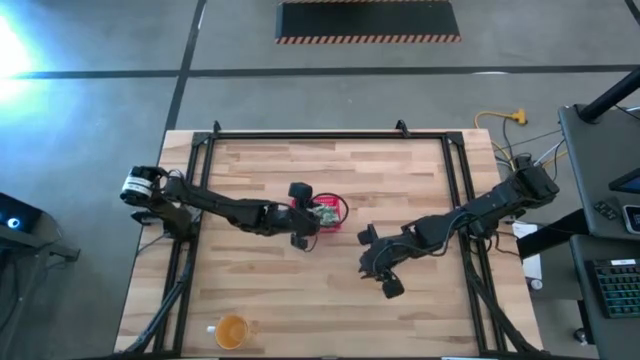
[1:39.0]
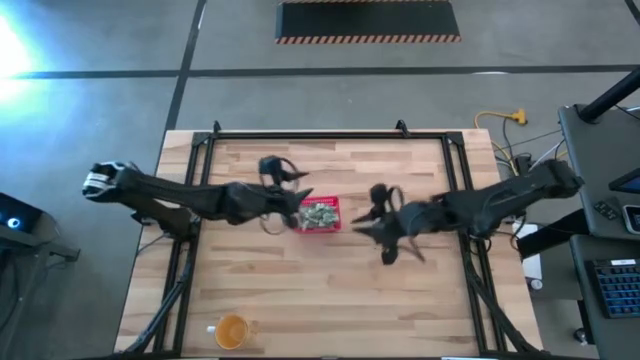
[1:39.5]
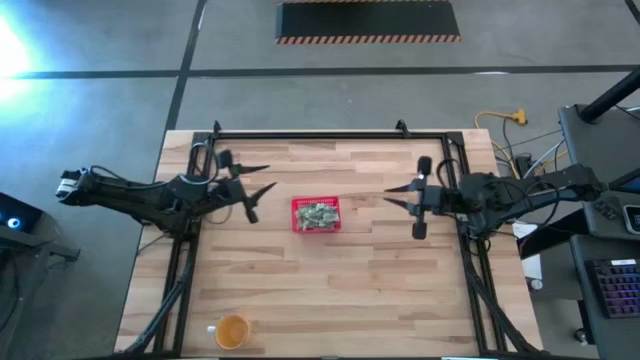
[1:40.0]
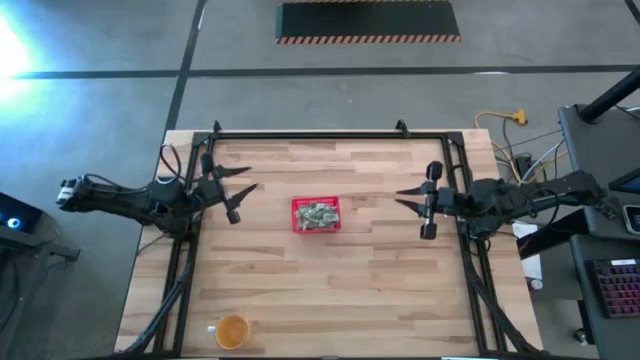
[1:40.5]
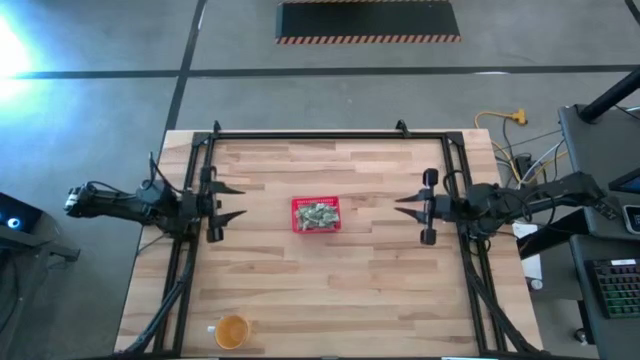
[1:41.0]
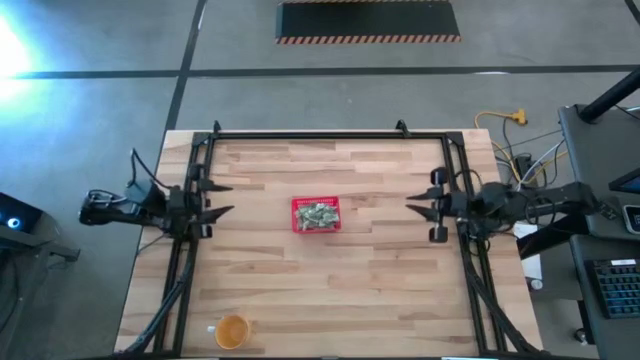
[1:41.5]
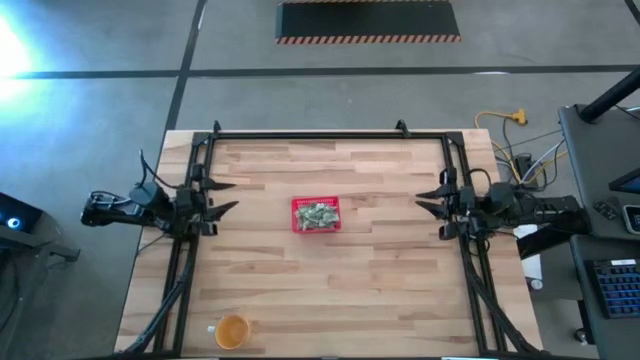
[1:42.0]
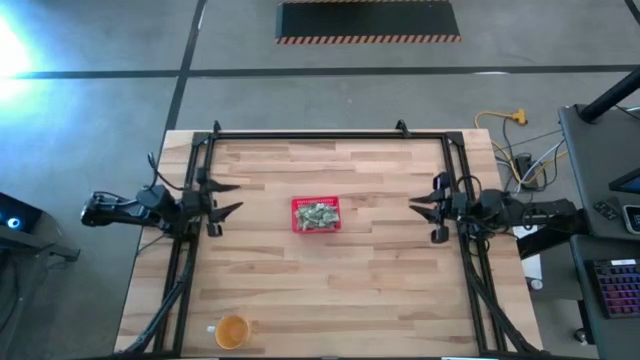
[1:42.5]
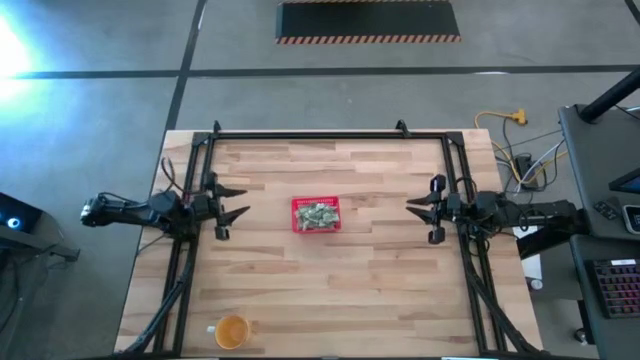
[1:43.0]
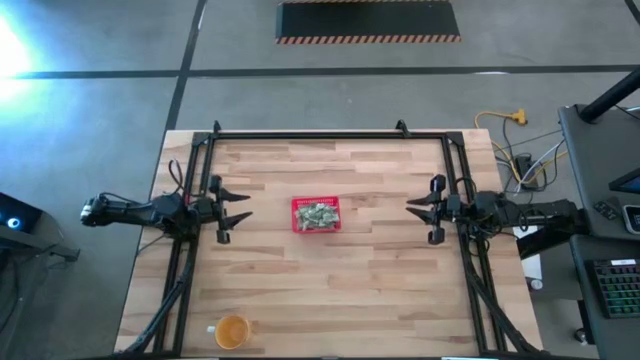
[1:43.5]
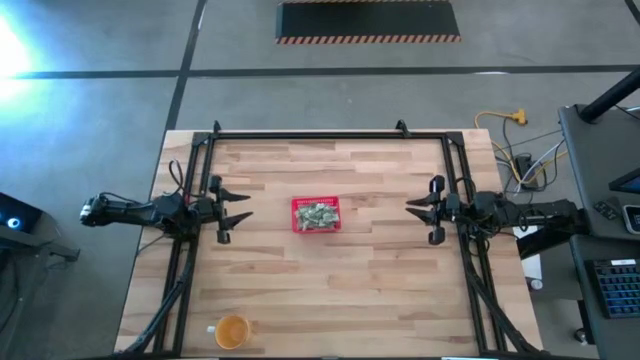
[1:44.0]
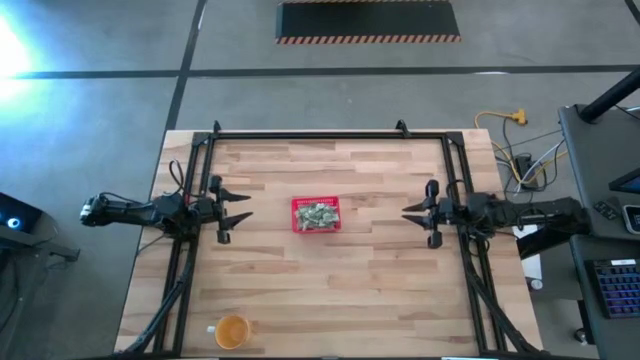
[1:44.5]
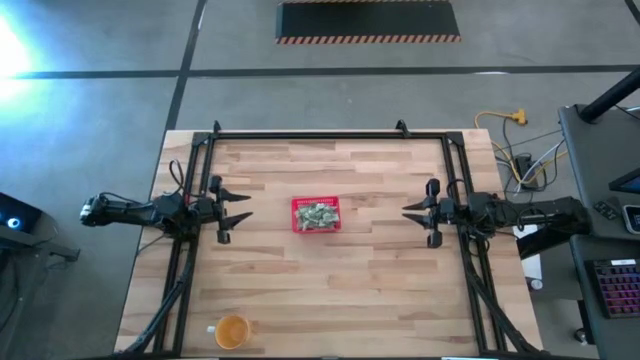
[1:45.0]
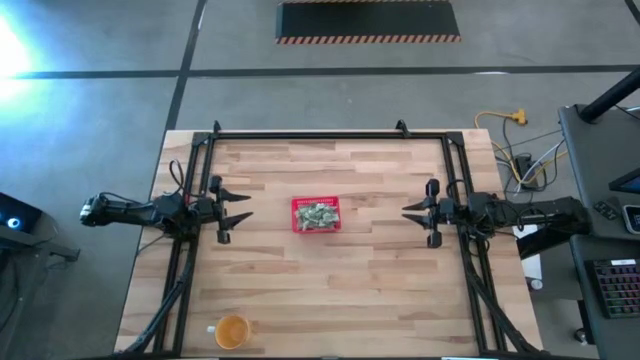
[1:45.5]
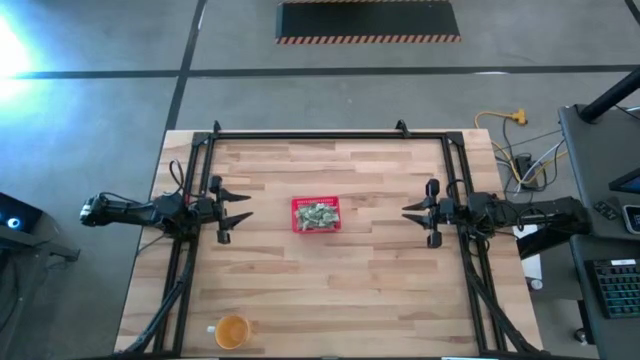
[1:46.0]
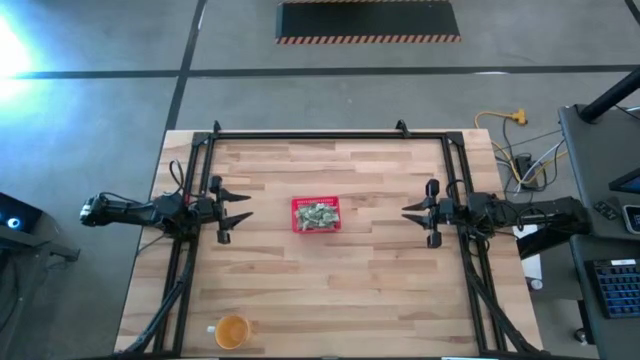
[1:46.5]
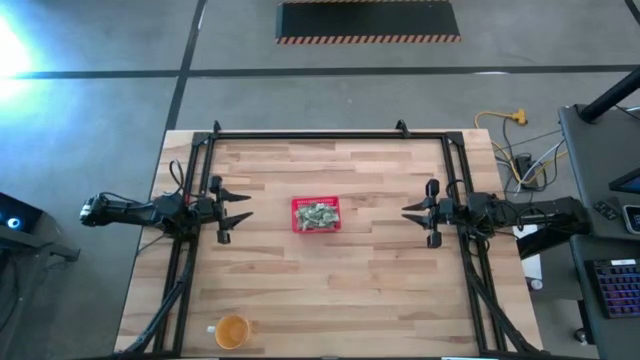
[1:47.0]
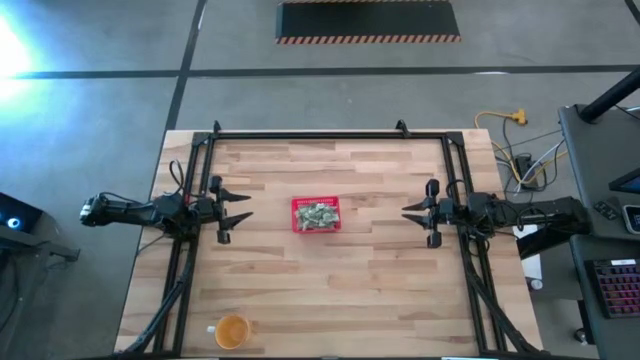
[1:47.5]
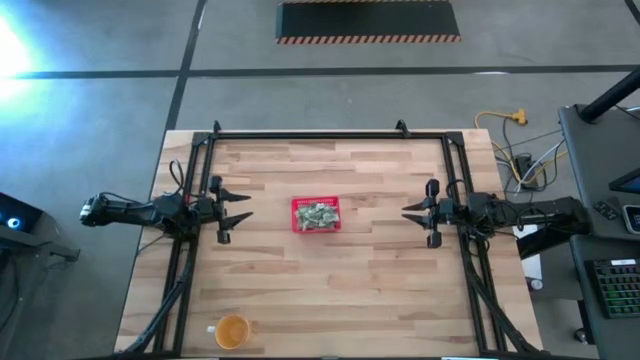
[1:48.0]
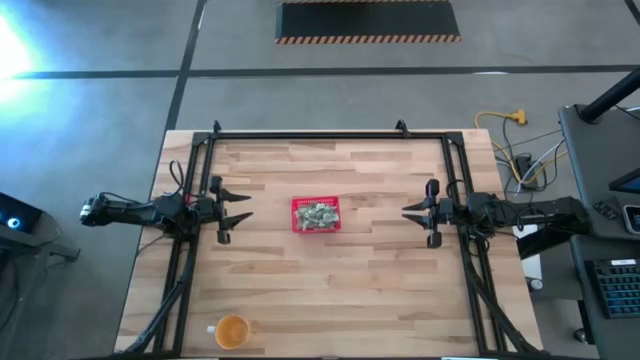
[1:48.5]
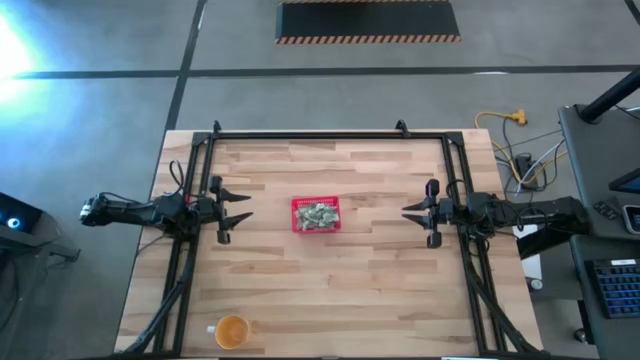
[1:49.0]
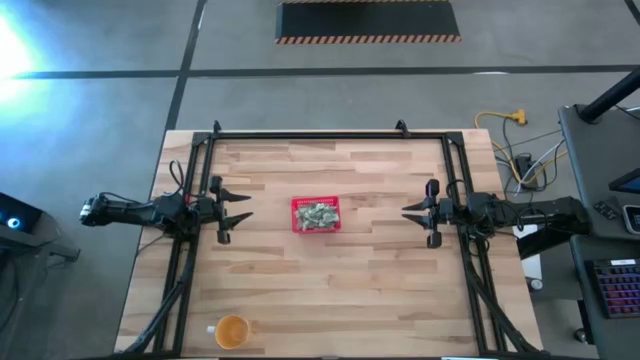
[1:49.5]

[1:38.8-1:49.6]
Task: Pick and place items into bin
Return to Home Position

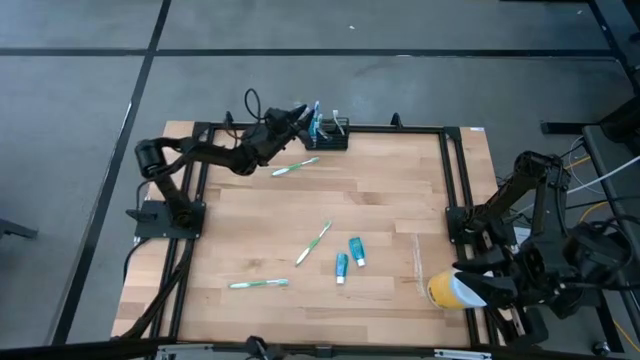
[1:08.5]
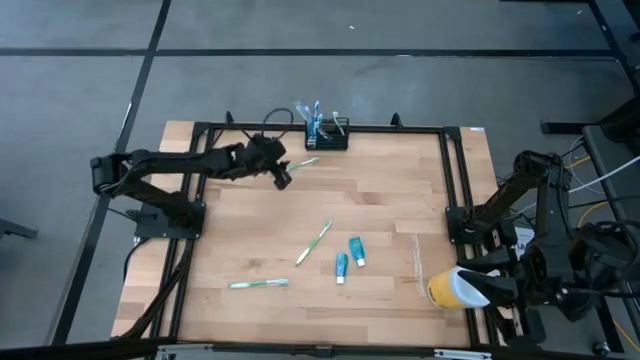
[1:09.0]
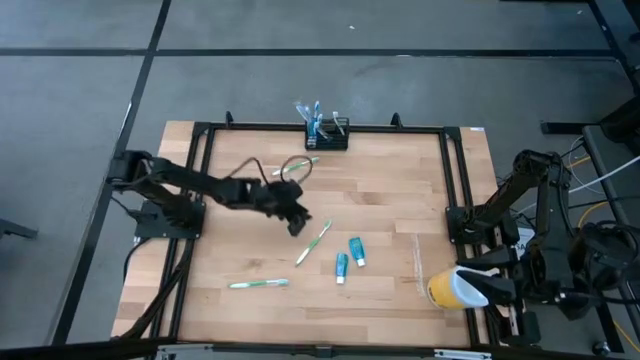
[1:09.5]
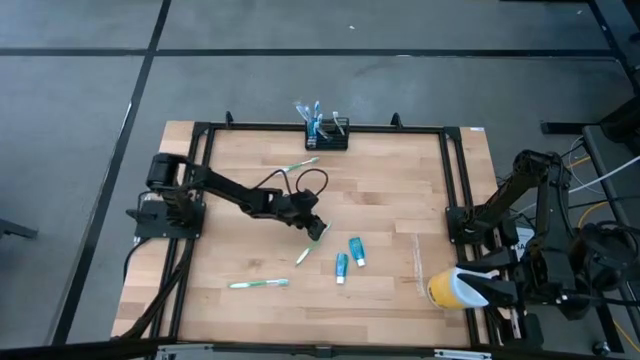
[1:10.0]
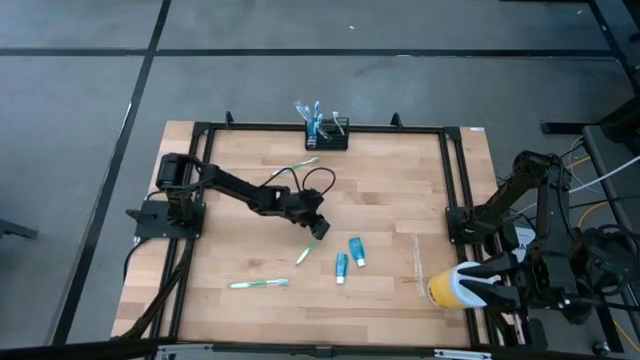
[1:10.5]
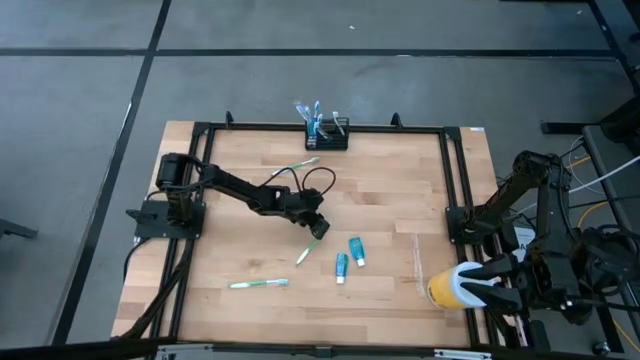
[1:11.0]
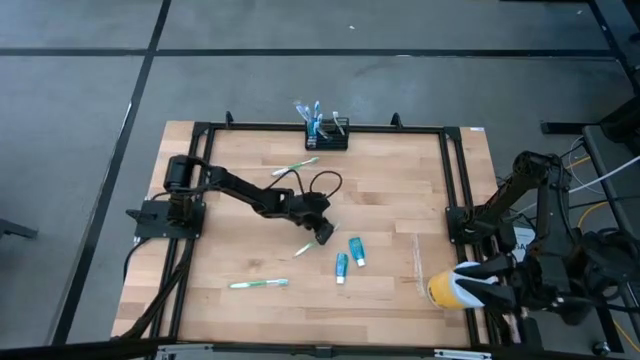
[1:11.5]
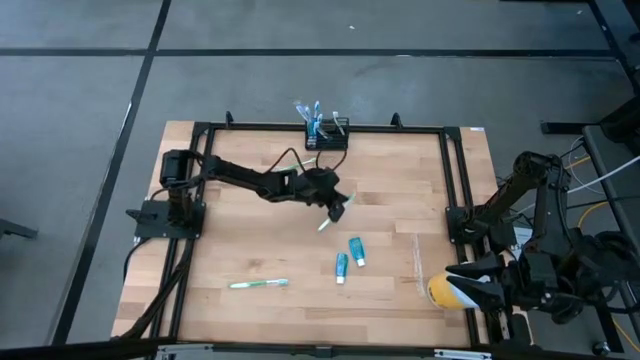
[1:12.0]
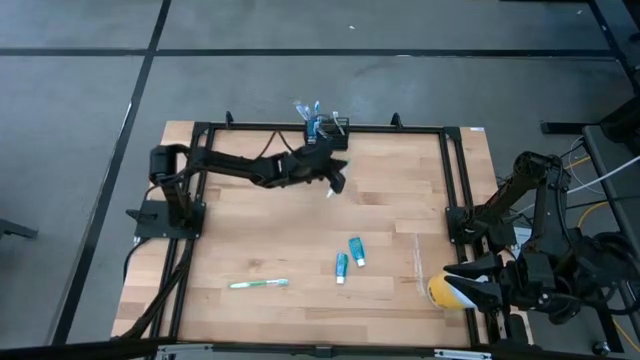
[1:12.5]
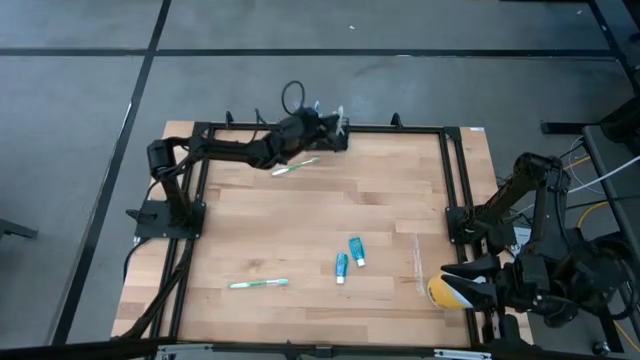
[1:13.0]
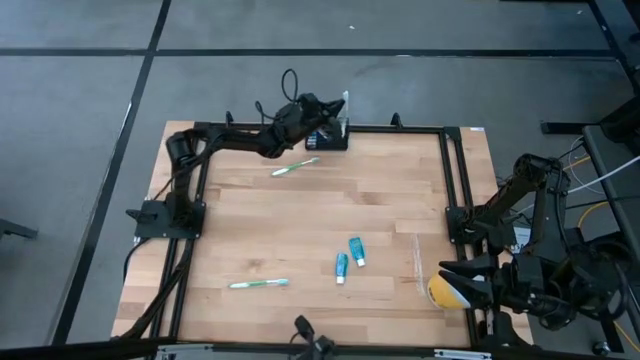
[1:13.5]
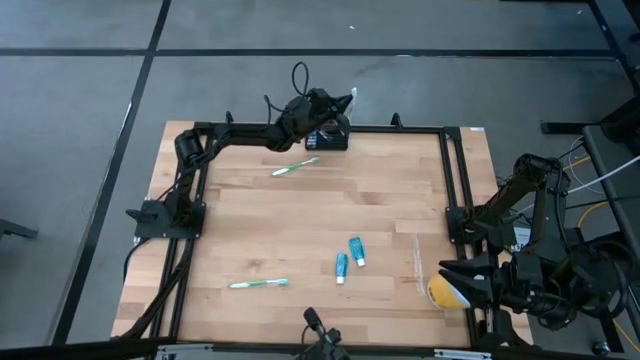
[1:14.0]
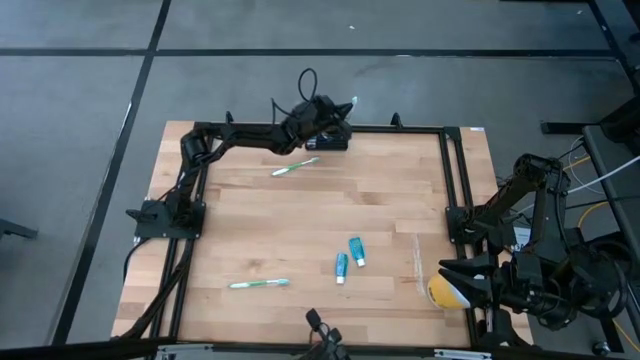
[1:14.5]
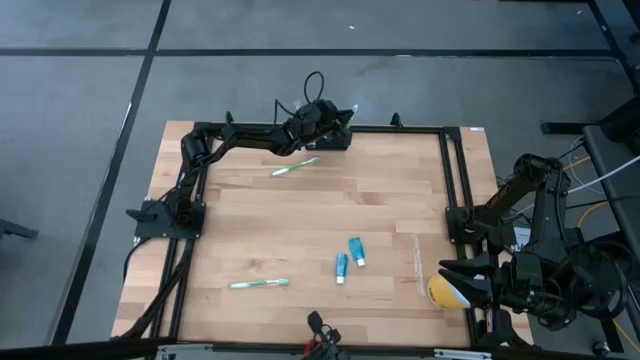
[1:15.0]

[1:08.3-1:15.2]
Task: Pick & Place toothbrushing station
Put the green toothbrush into the wire organizer

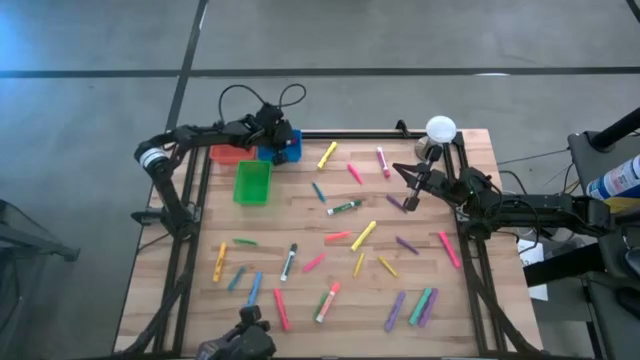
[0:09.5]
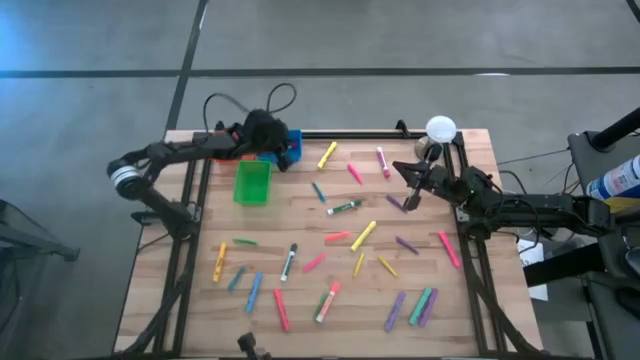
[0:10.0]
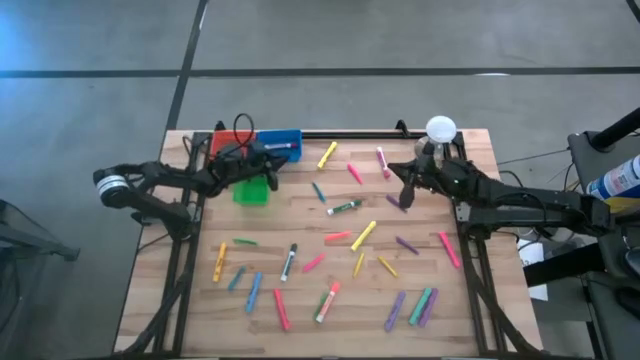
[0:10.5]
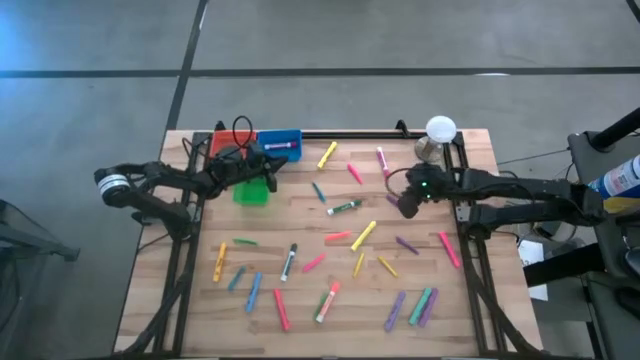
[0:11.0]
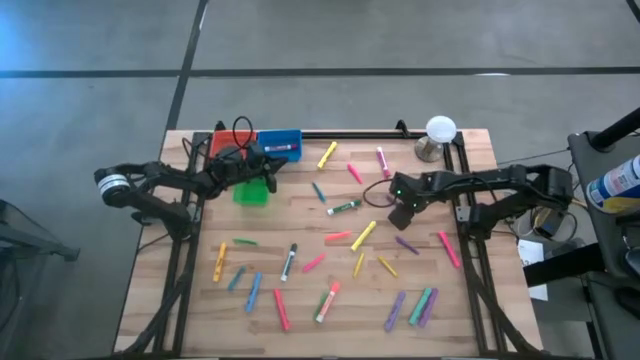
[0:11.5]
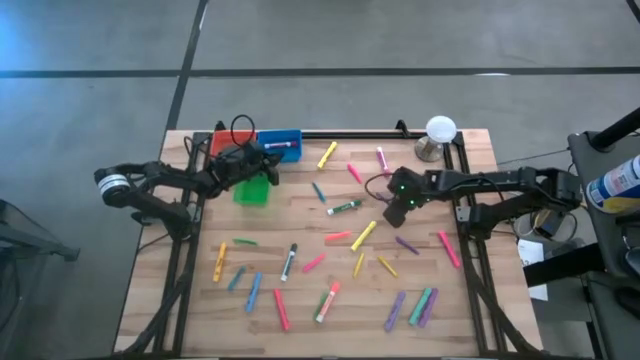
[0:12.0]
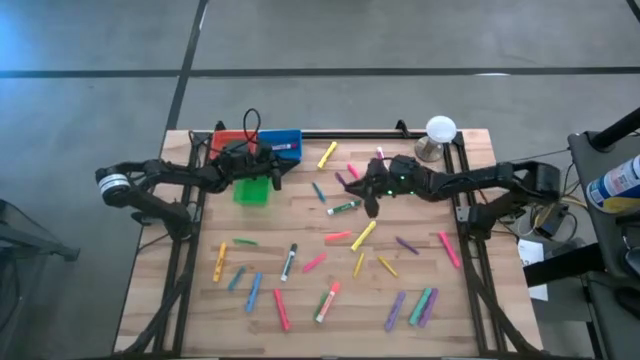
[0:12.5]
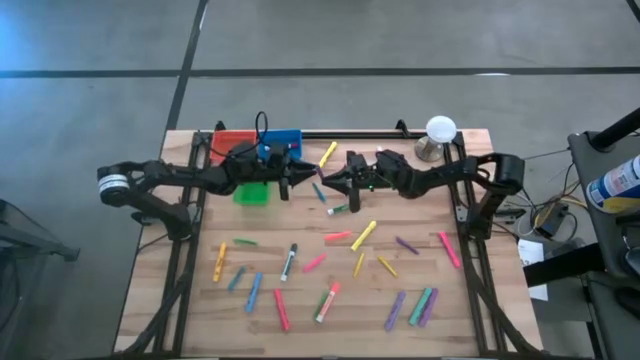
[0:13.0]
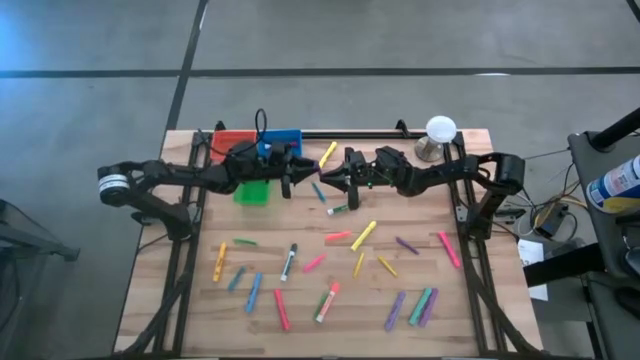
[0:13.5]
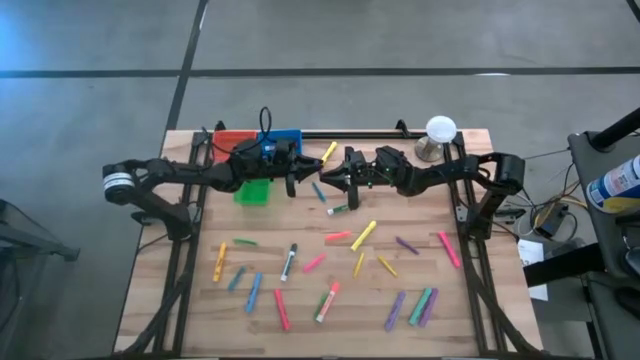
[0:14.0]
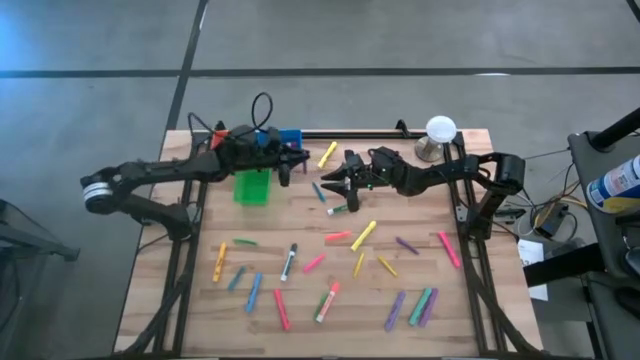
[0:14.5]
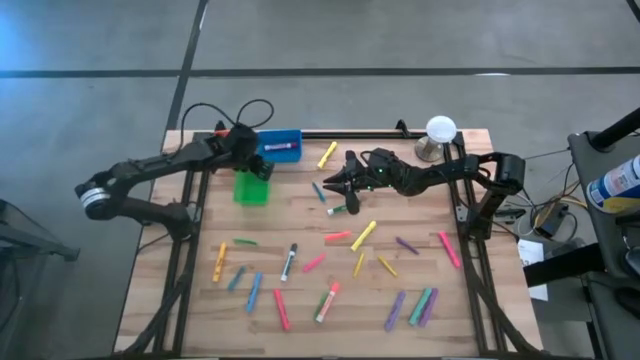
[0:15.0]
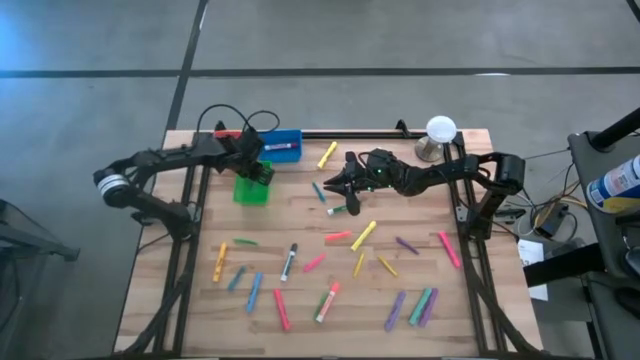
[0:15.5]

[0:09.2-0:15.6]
Task: Pick & Place Markers
Put the purple pen into the green bin
